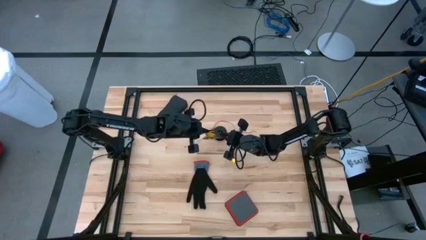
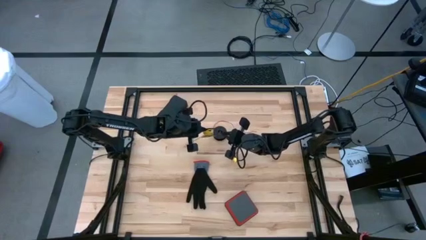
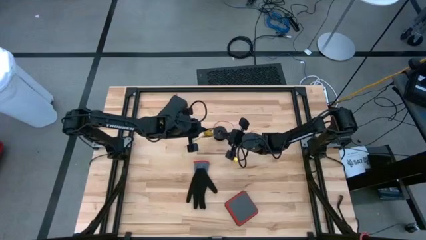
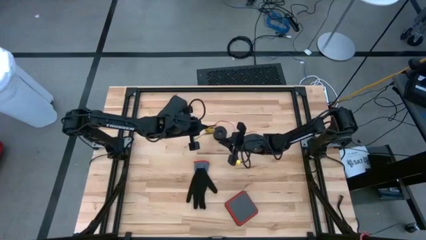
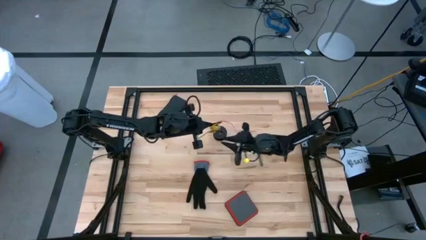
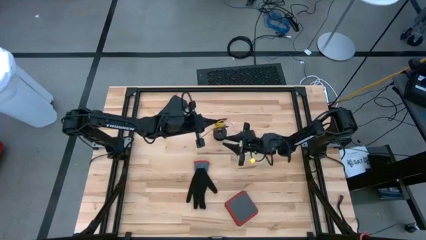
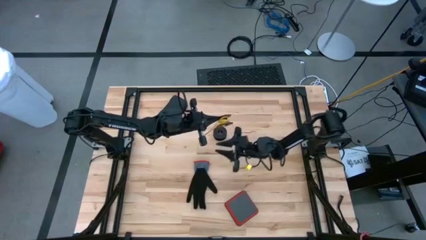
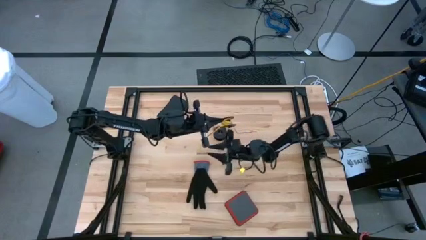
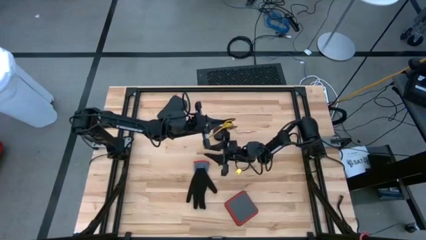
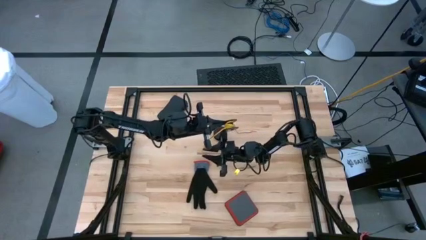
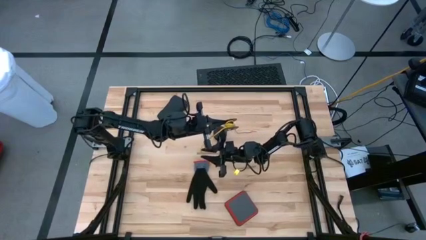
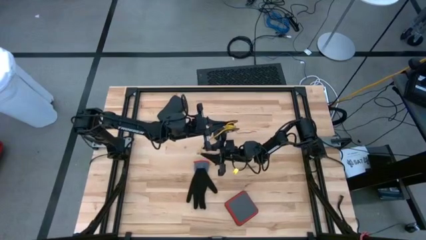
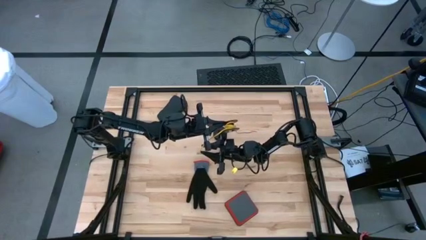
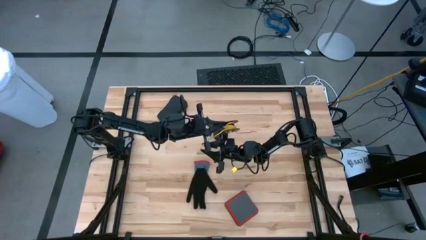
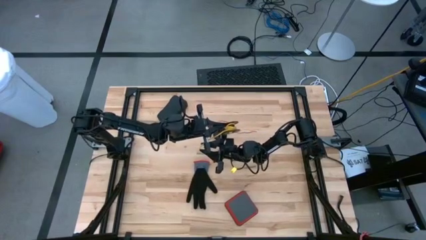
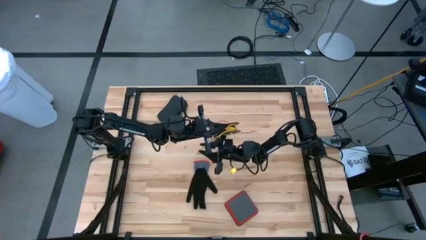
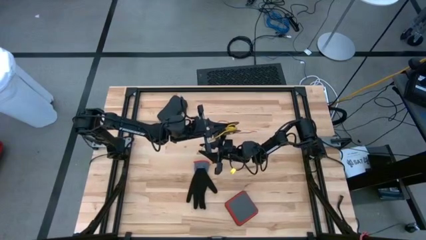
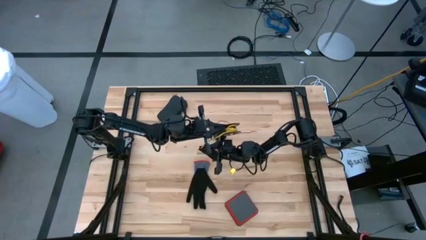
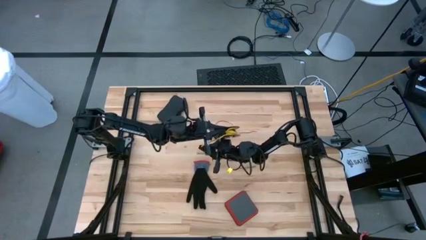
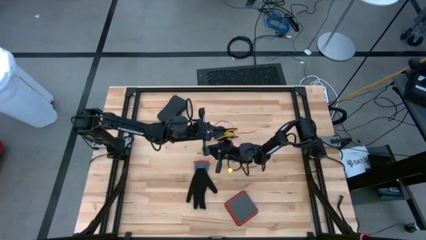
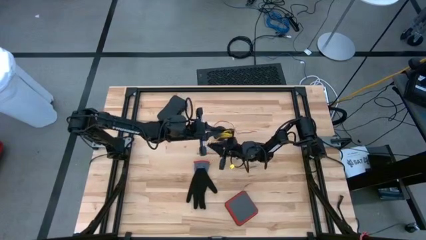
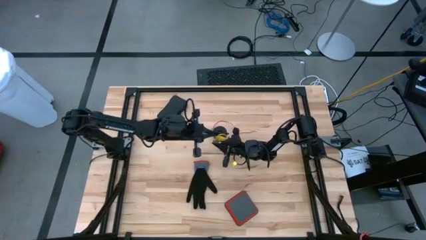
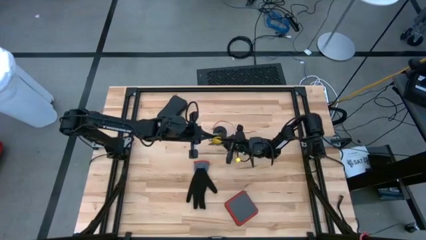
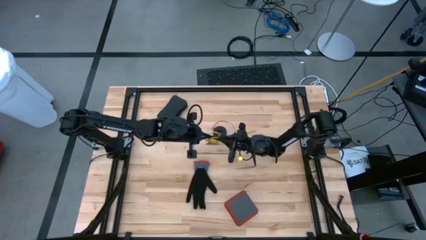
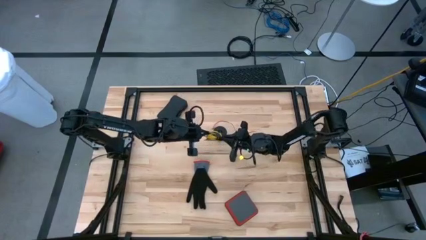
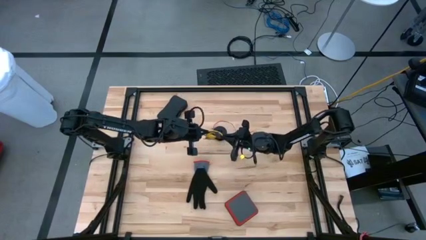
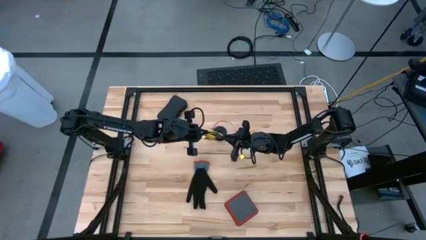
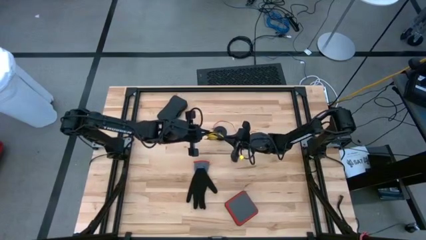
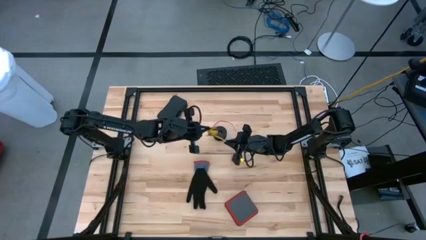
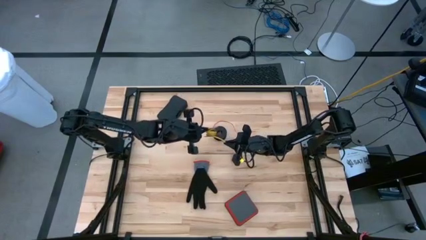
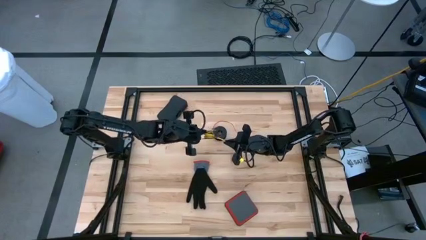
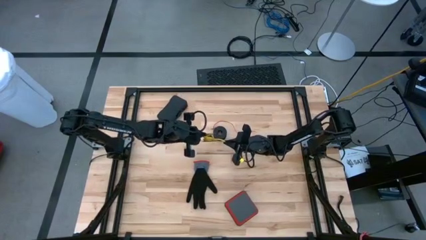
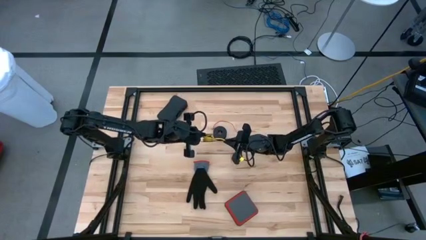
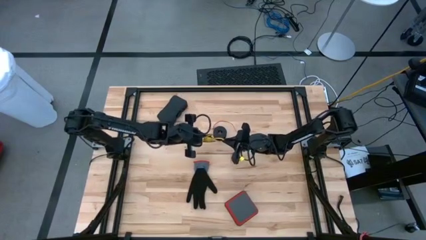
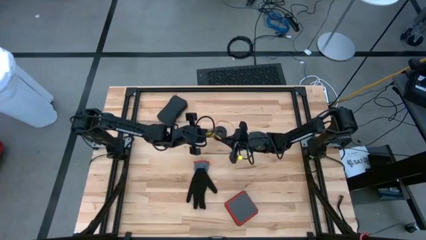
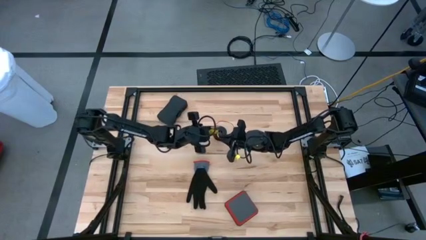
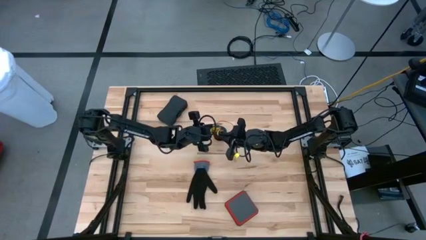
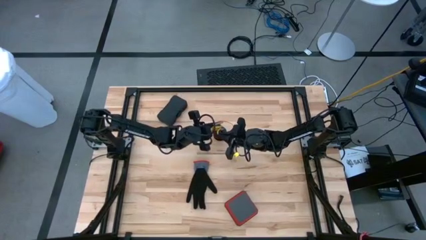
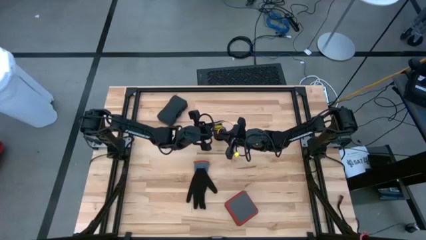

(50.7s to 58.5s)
Task: Coil cords
Coil the yellow wire onto the black spool

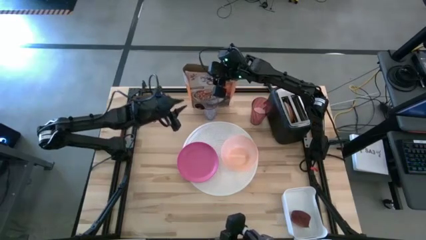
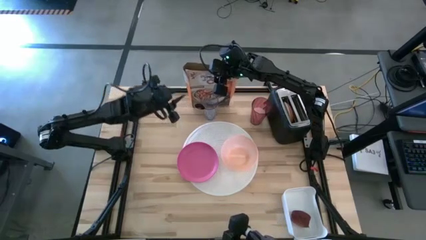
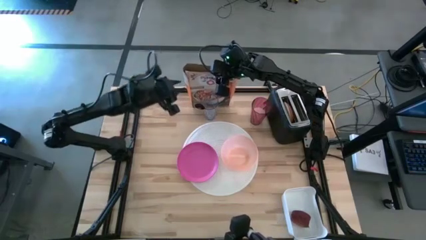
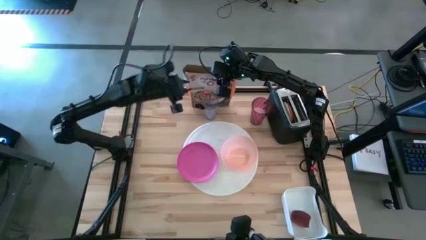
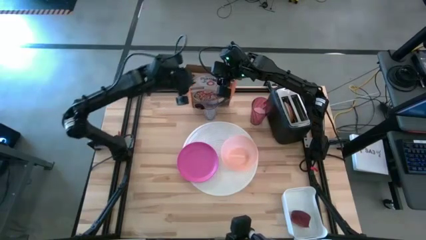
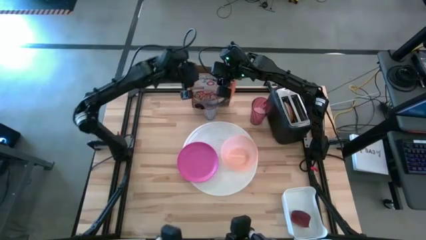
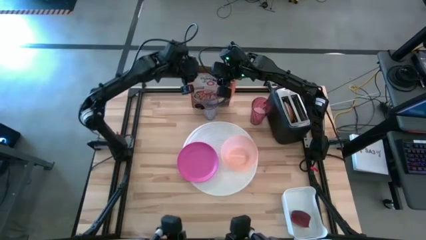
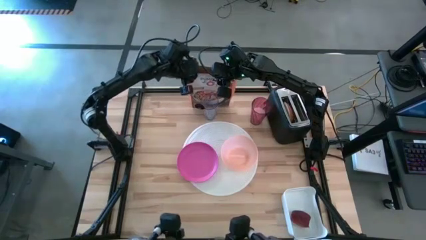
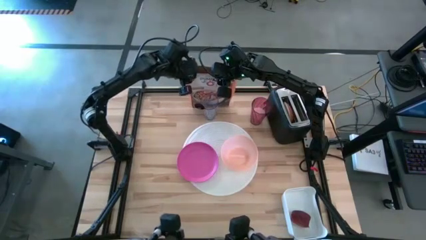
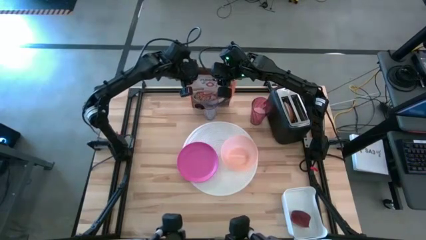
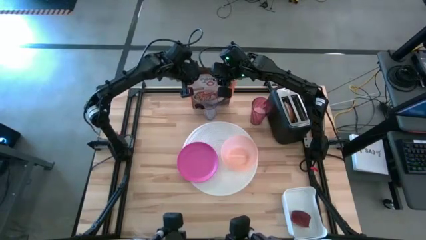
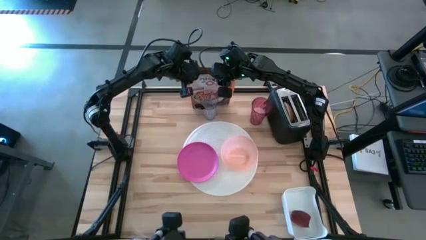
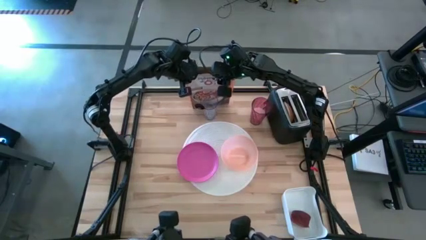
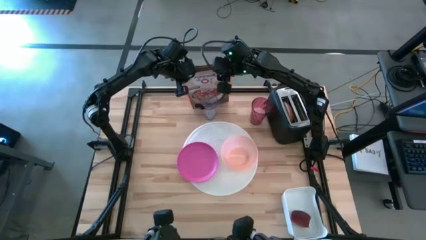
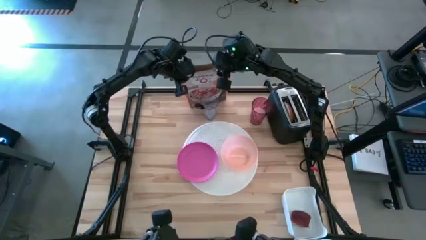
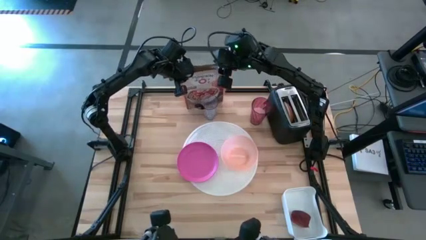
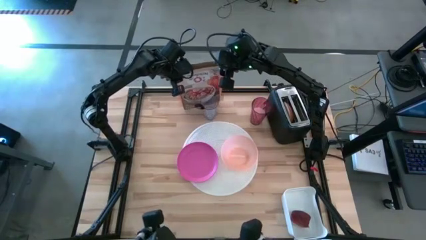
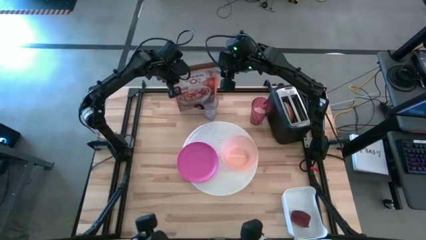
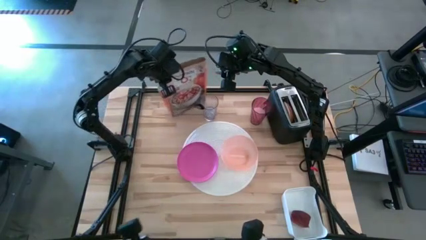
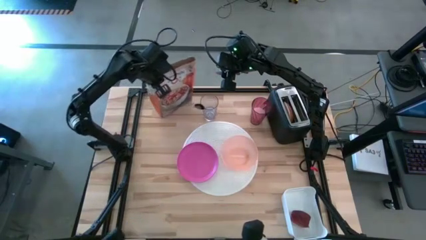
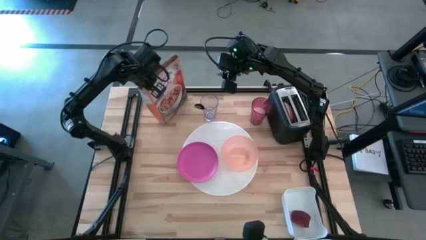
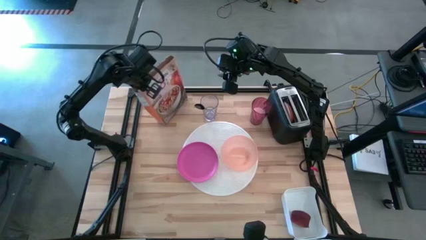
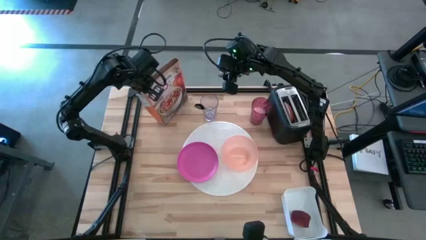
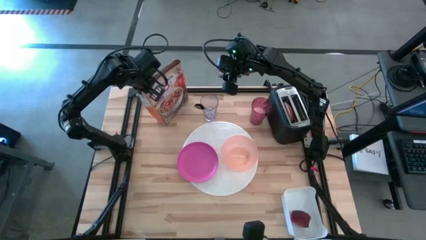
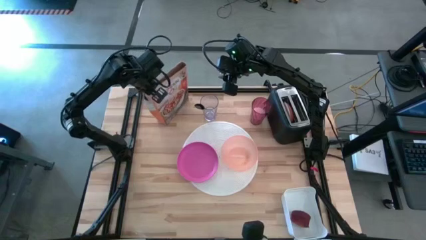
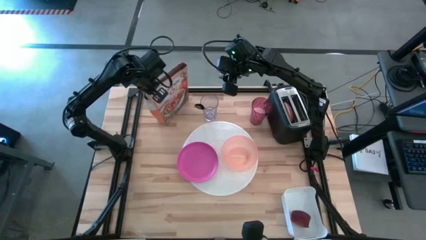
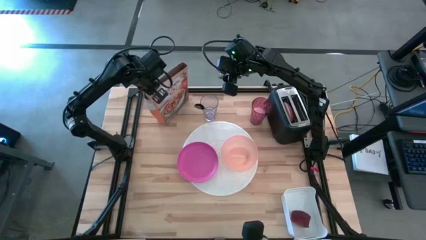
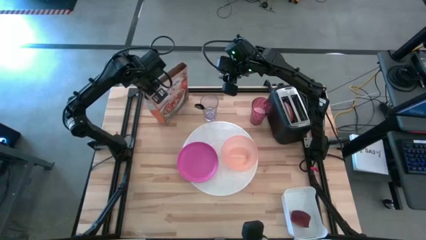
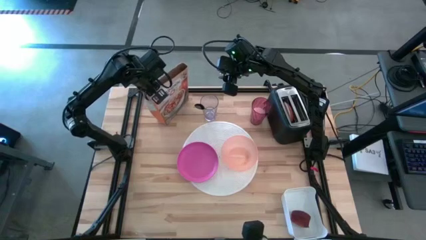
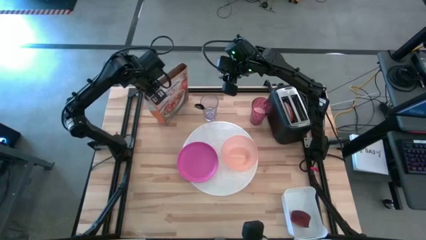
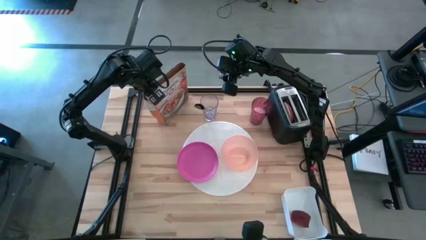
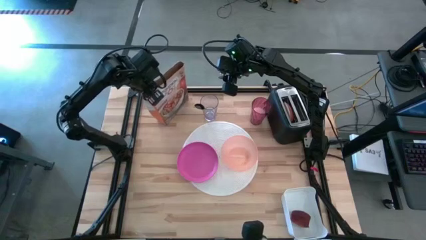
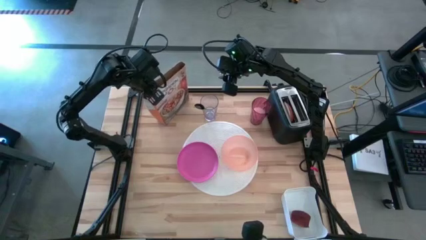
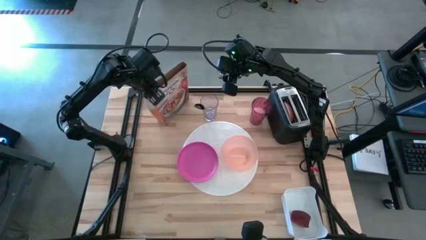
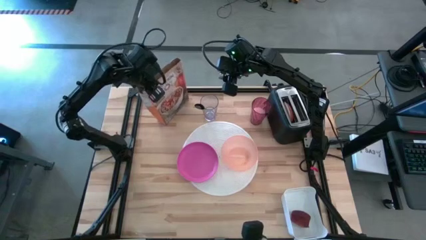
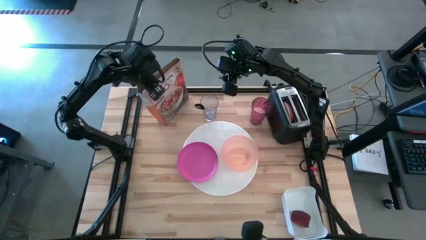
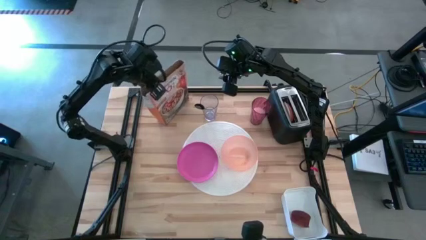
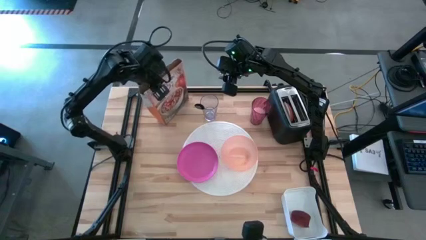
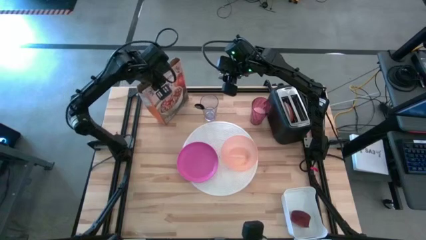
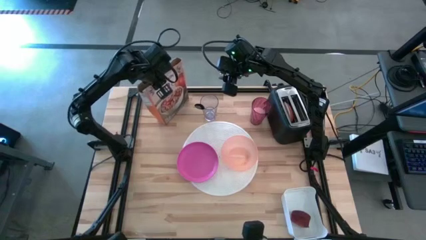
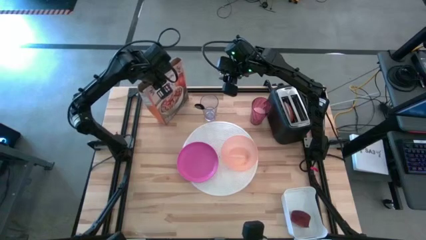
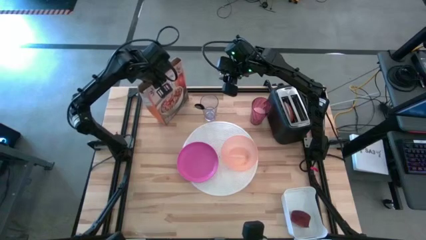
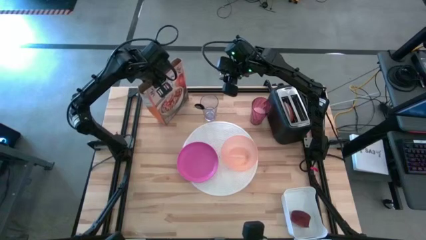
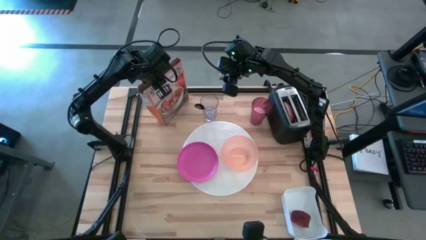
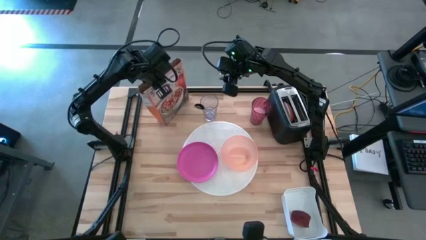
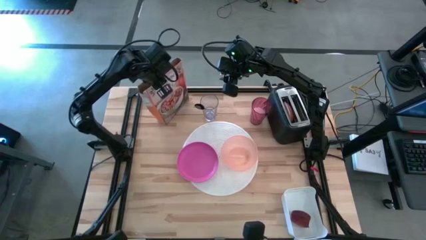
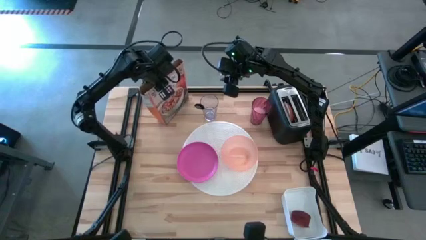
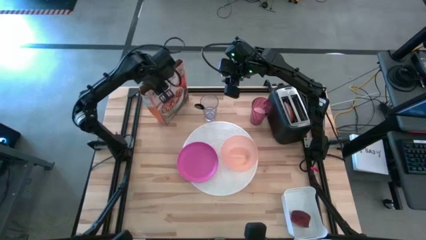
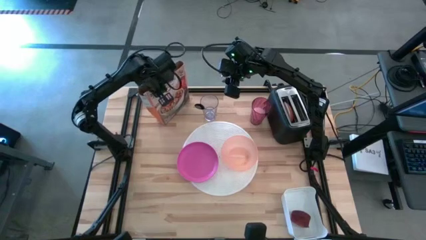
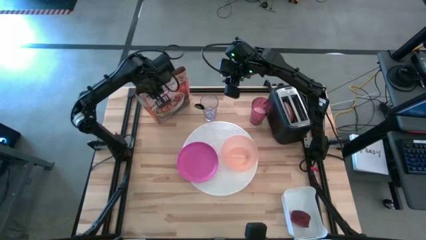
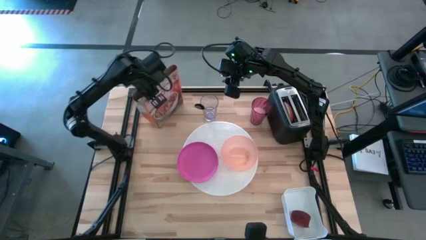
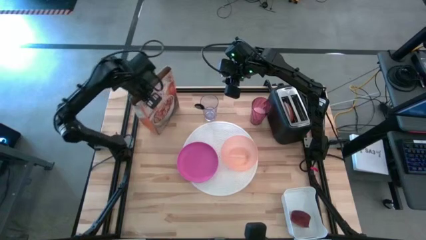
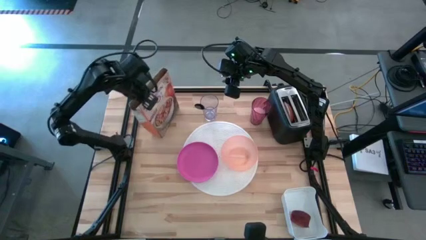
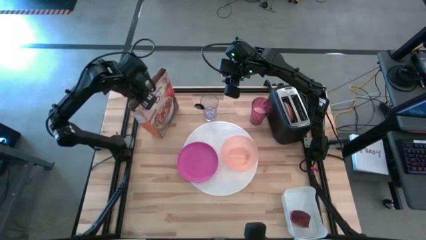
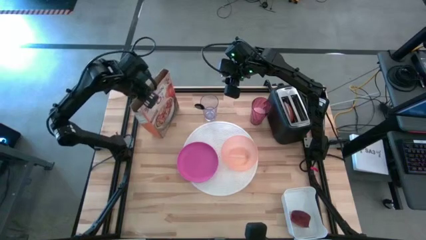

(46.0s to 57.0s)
Task: Arrange a breakfast setting
Move the cereal box on the top left of the table
